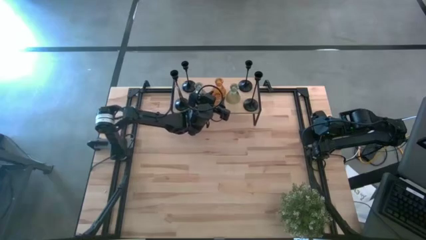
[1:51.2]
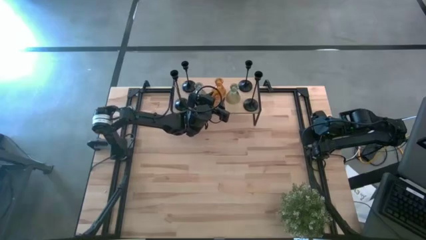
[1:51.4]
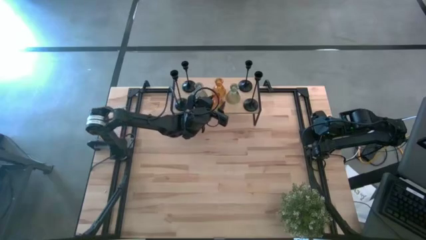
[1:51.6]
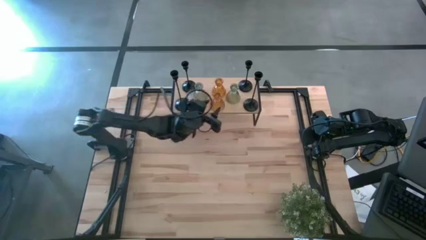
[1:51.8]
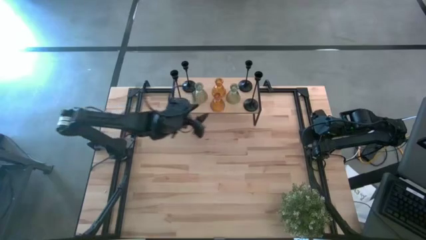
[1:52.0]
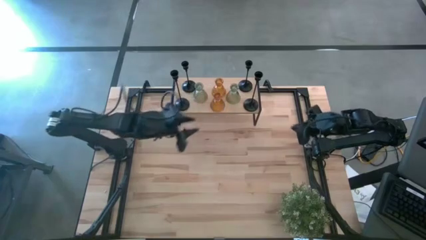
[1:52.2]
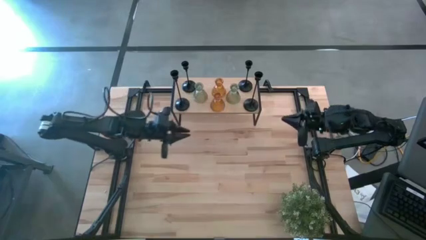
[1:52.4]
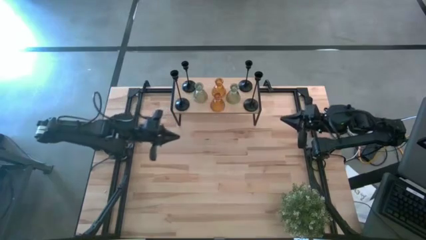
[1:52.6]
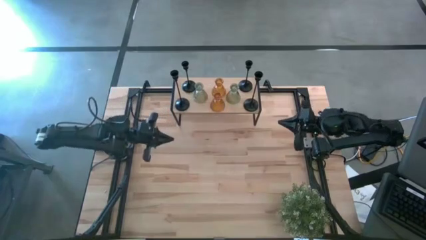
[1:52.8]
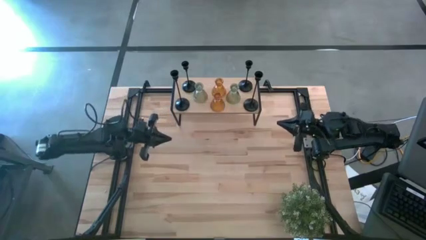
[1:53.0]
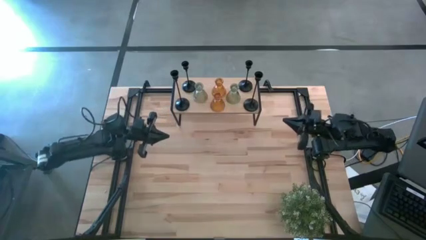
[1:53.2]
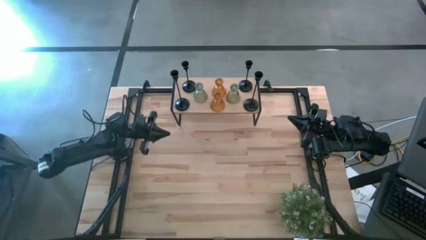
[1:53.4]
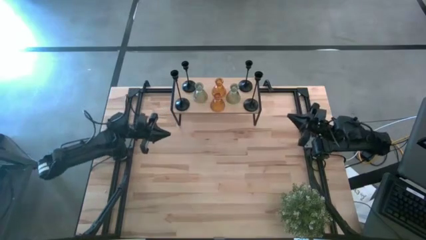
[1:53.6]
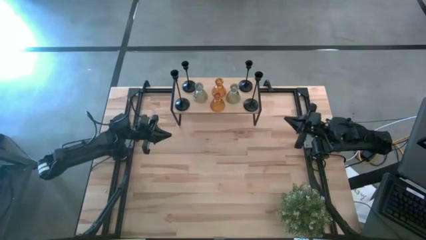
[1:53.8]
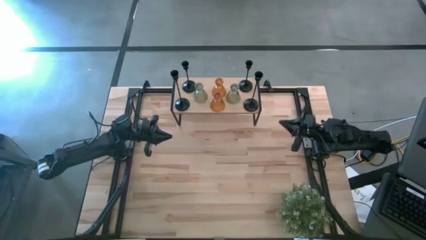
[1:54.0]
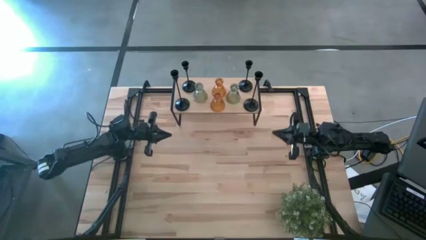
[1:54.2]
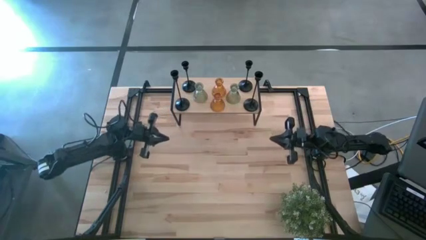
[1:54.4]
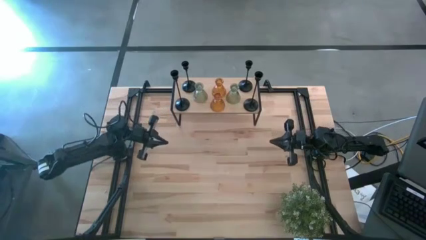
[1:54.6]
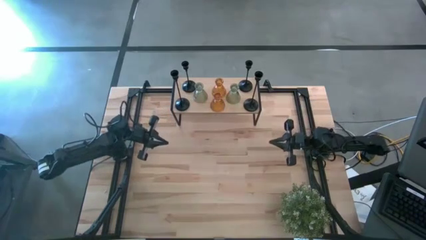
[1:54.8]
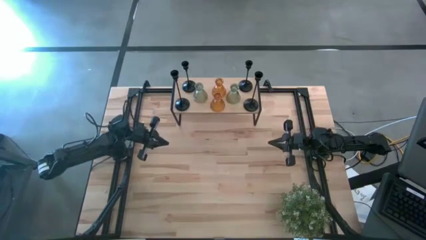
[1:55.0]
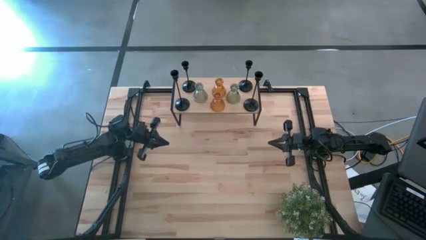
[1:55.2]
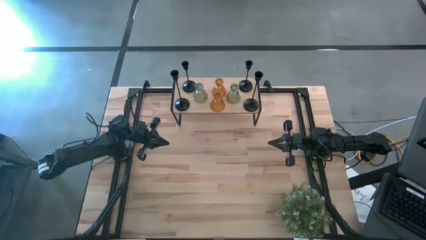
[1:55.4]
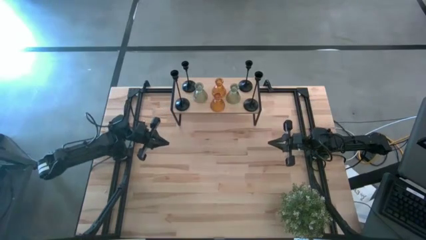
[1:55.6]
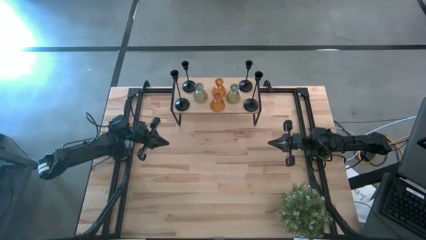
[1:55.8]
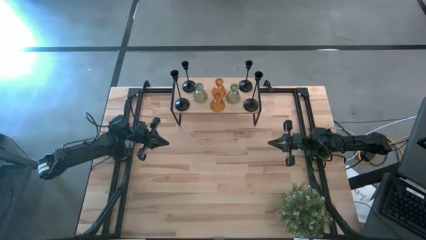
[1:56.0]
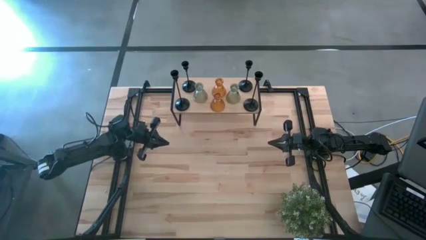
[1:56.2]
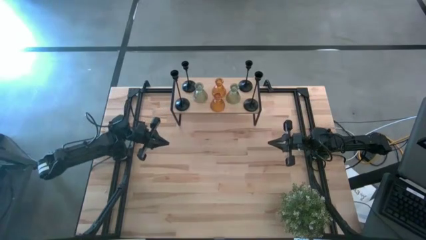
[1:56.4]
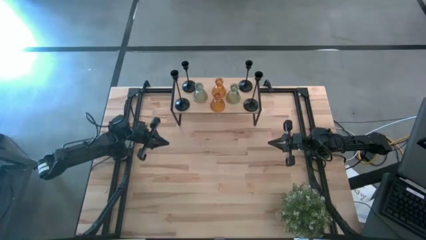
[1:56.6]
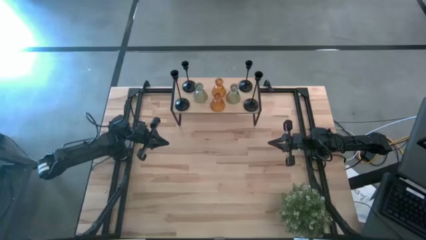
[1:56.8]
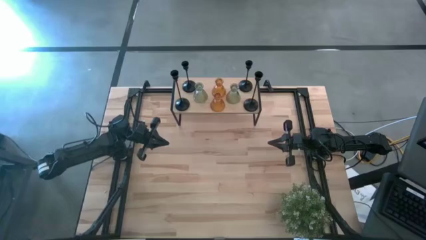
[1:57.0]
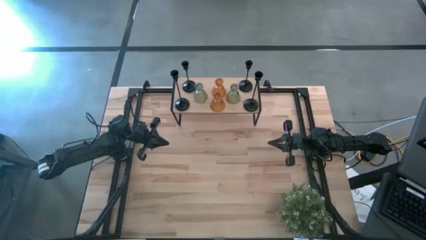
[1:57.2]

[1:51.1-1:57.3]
Task: Pick & Place candle stick holders
Return to Home Position

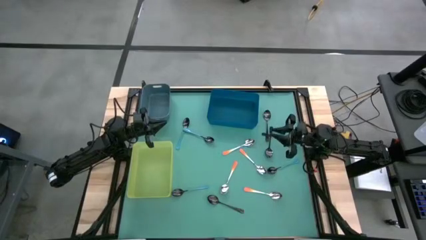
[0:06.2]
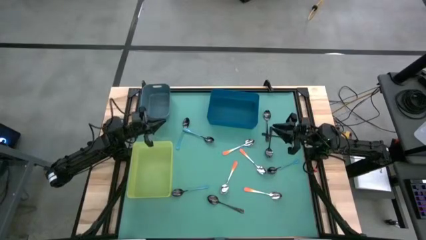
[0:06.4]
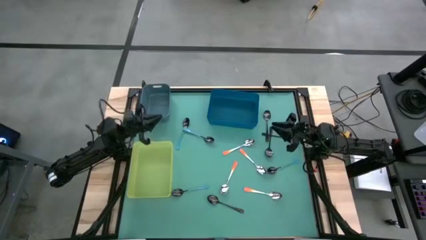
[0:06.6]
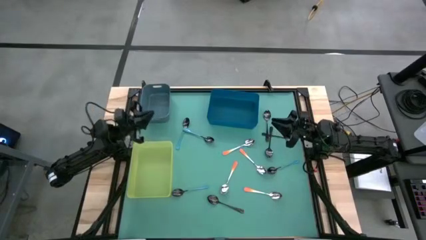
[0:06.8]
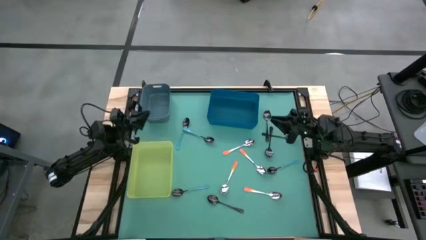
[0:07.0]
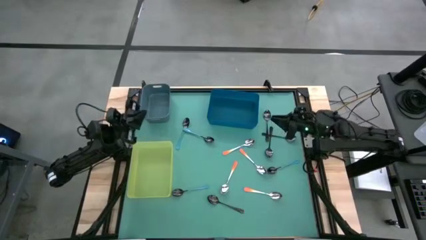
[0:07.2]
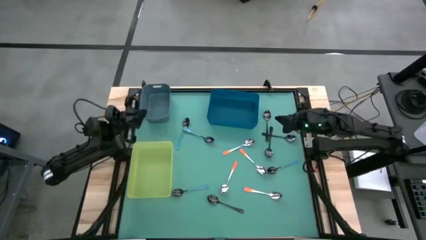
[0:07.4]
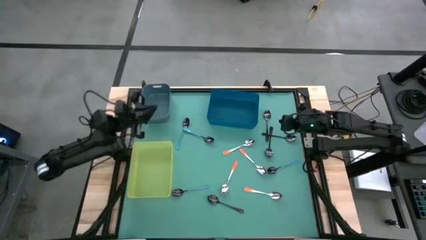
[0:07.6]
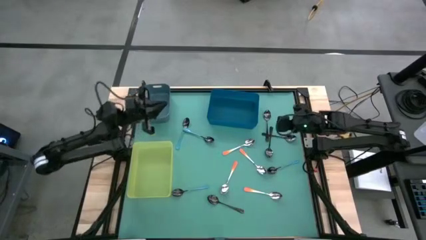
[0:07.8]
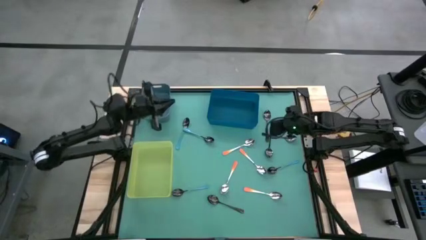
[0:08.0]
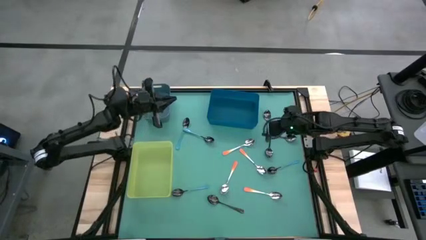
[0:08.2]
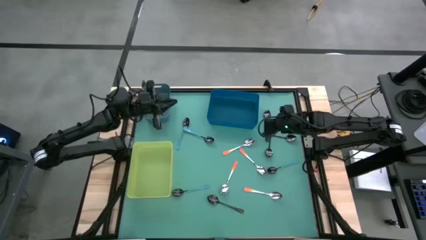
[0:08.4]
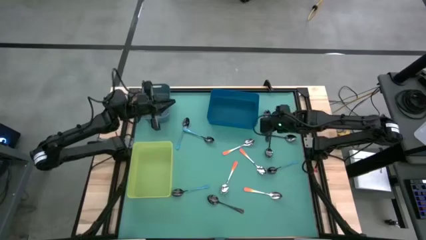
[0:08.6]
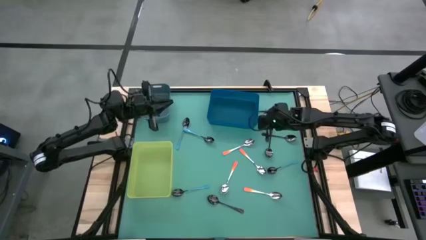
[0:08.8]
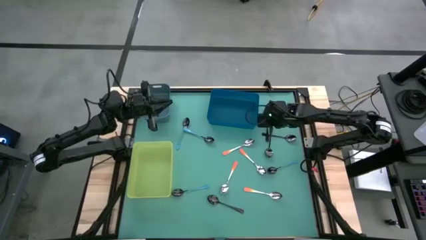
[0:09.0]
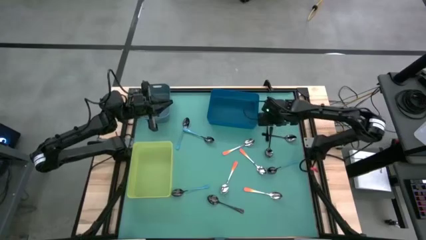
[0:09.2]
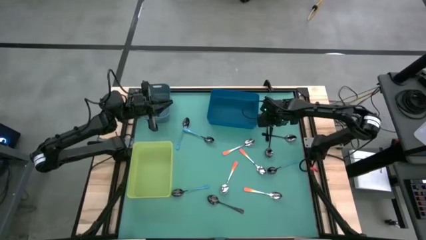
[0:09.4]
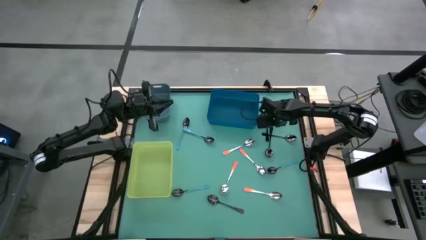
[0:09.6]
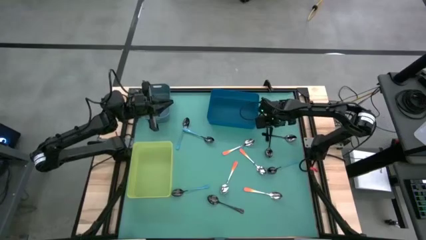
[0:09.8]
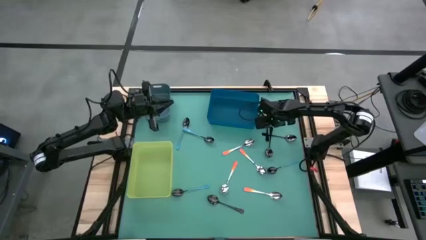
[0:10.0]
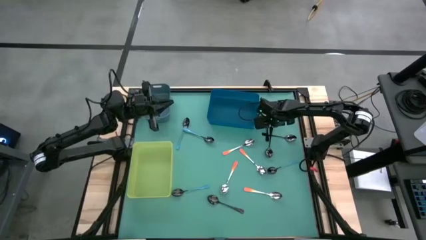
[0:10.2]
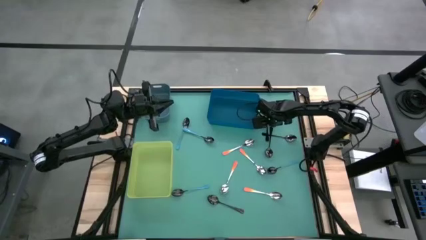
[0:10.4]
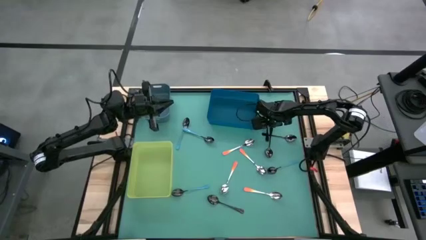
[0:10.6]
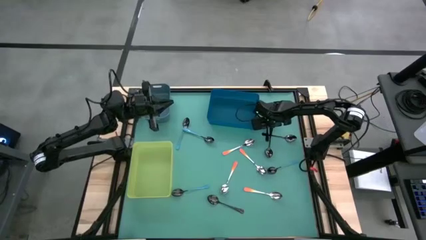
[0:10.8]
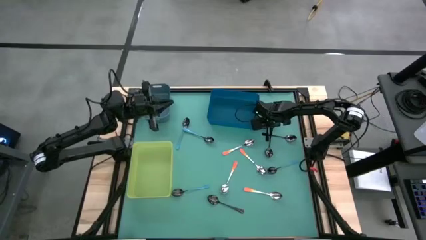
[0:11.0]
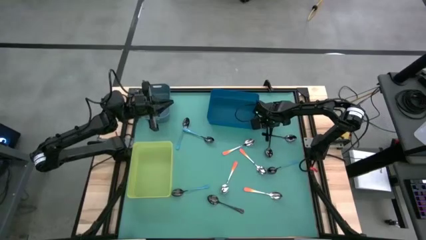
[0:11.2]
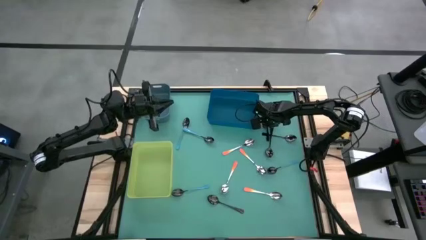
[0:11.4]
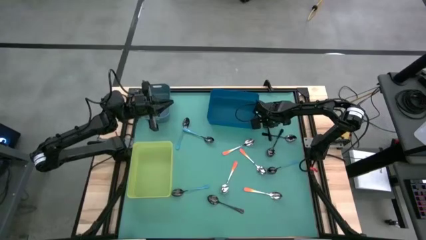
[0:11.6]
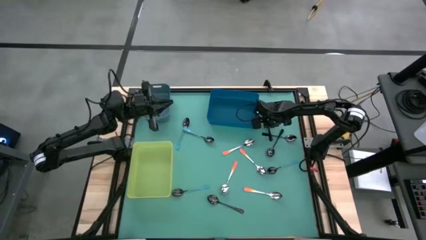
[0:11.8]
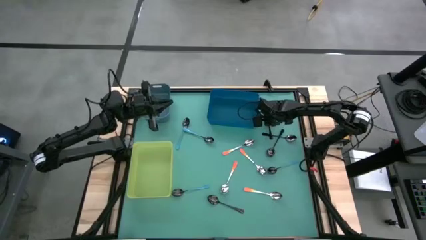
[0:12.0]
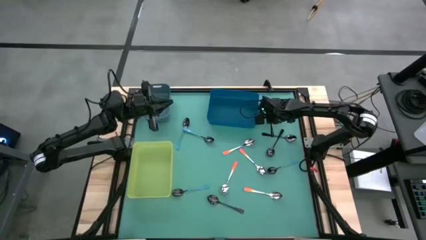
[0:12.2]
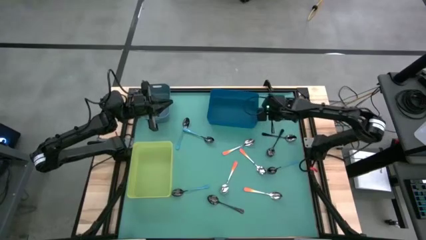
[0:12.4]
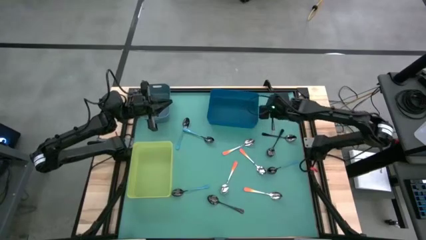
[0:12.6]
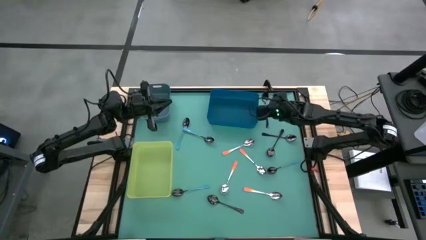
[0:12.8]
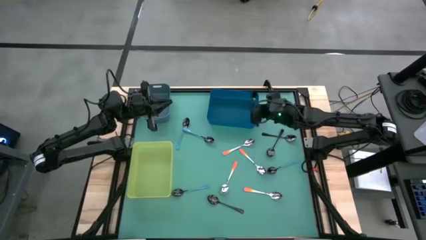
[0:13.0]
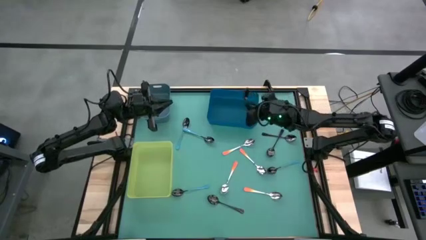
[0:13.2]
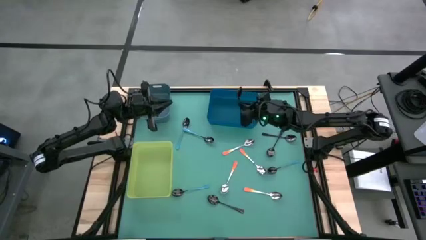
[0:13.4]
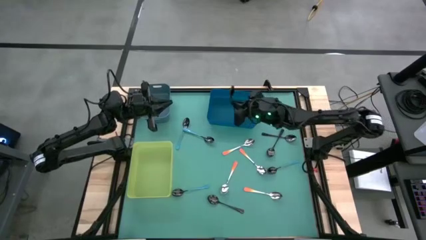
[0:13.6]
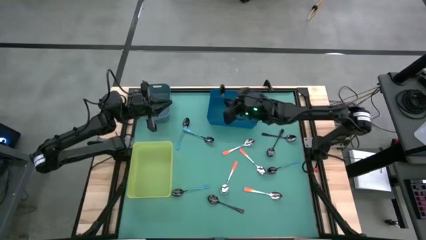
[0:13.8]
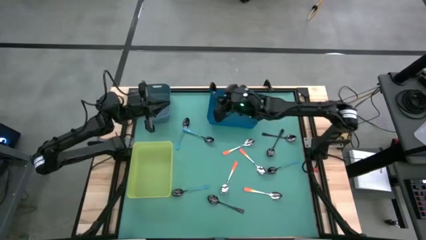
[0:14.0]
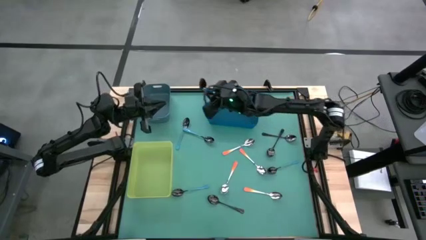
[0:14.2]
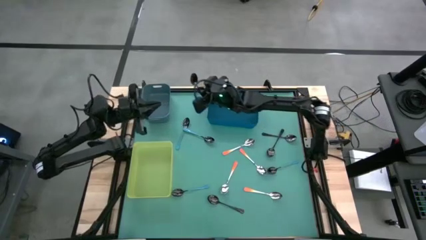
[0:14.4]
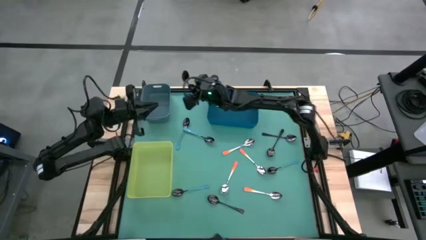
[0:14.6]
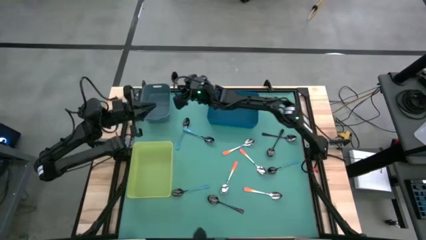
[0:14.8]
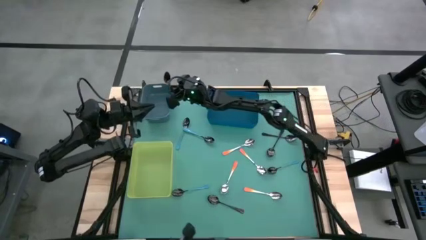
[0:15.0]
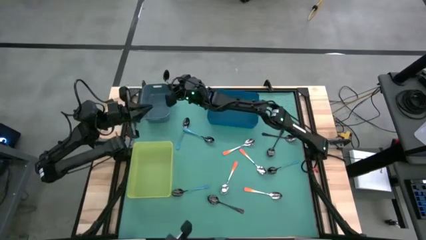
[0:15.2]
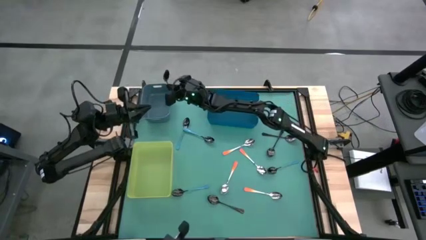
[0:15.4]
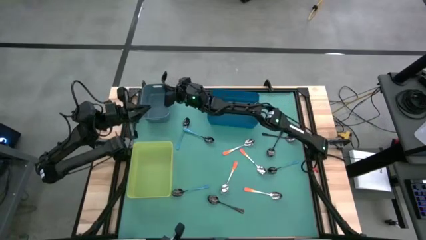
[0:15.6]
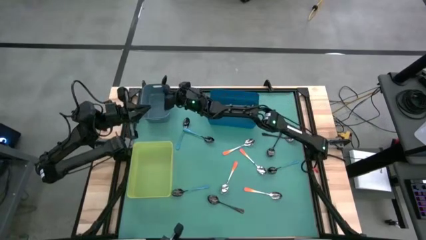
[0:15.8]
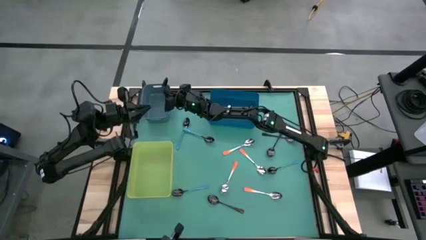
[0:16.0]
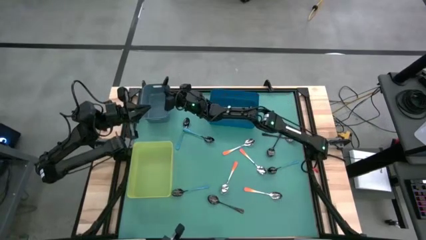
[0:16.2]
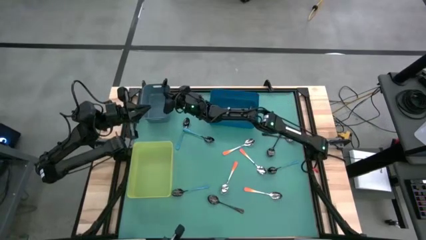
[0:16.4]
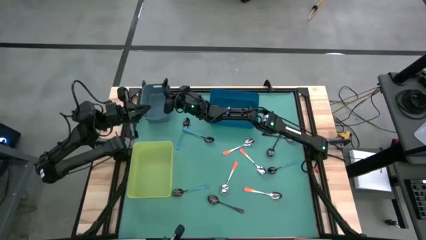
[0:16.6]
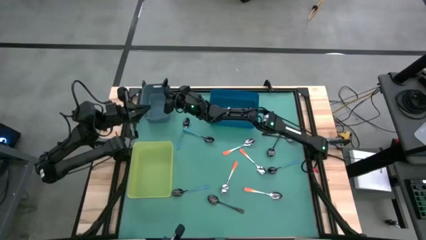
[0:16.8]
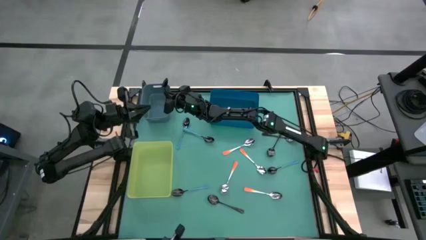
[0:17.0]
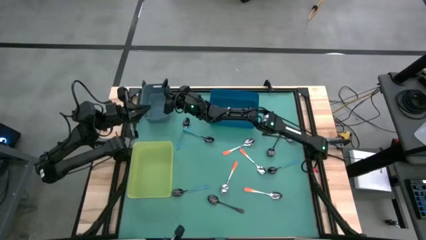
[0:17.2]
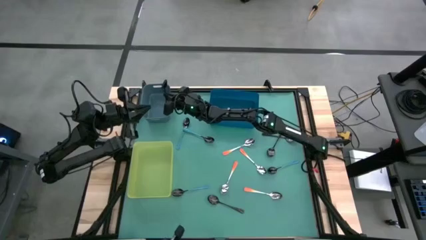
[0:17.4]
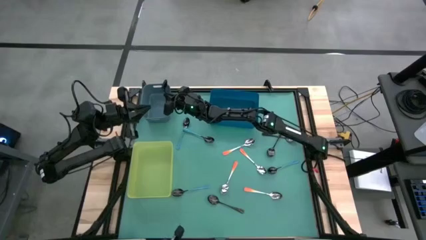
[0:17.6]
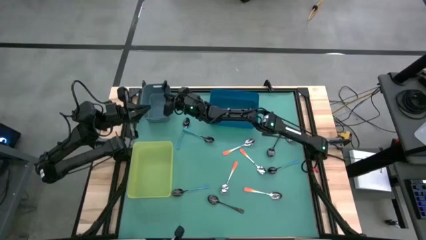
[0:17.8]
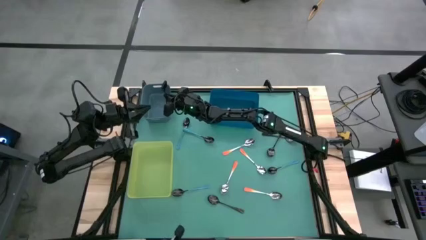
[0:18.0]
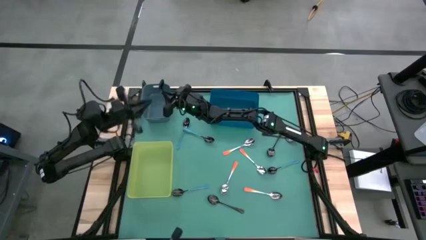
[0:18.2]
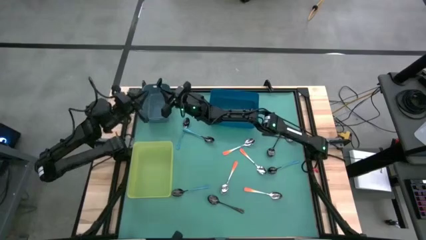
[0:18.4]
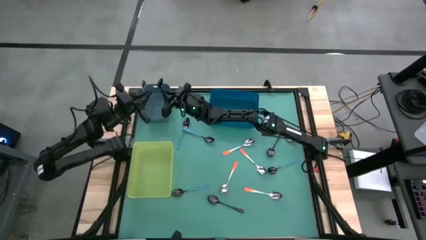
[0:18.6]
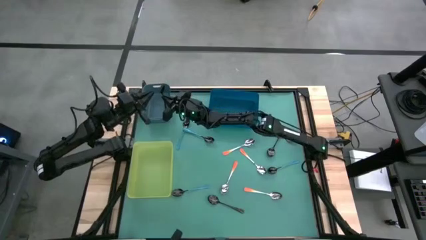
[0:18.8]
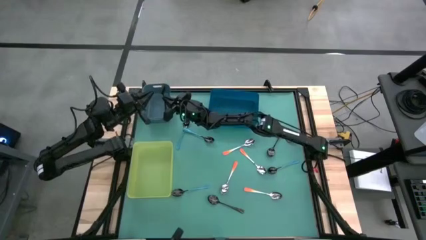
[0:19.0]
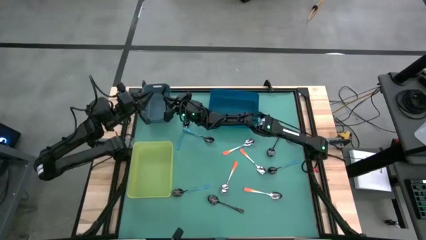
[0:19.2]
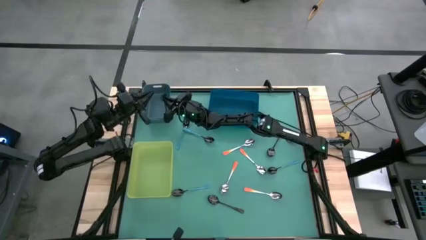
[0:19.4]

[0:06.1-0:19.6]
Task: Sort silverware by color (type)
Put the black spoon into the blue bin
